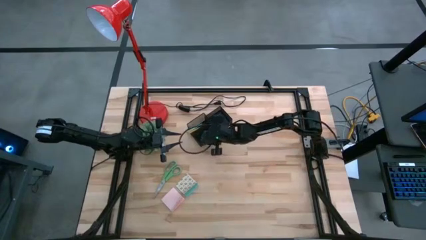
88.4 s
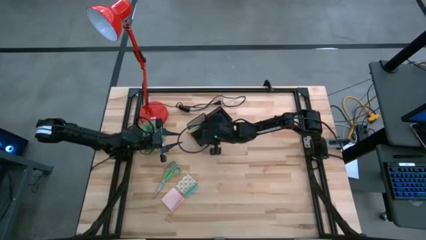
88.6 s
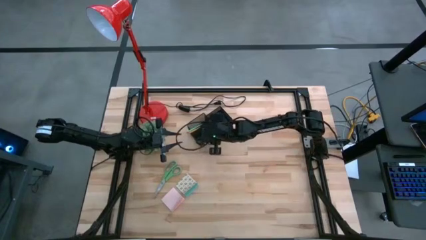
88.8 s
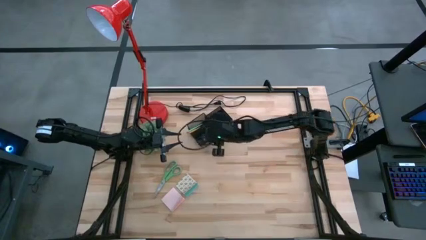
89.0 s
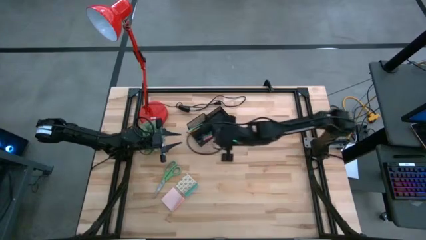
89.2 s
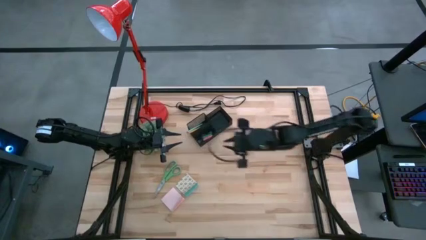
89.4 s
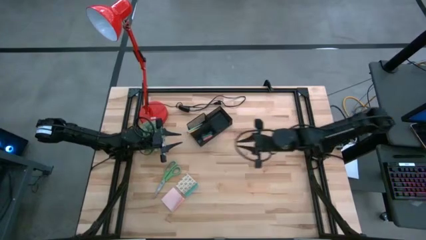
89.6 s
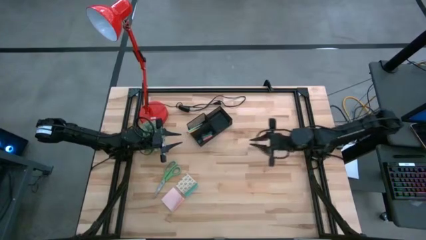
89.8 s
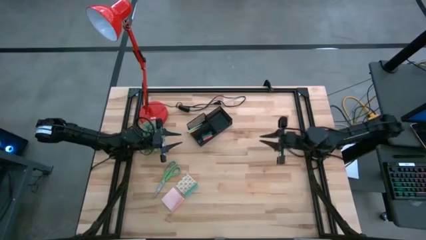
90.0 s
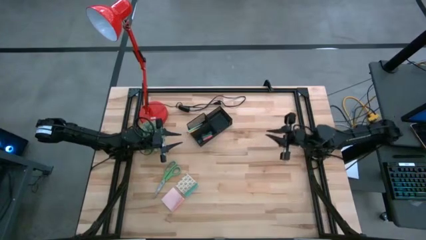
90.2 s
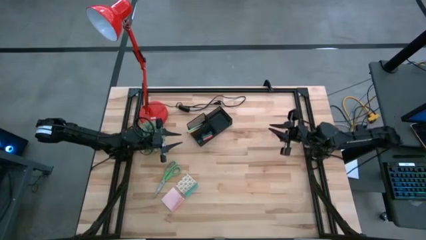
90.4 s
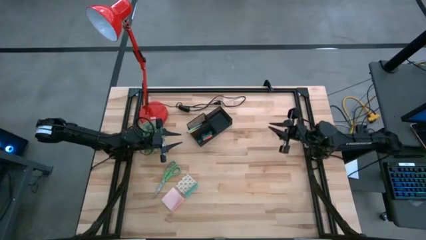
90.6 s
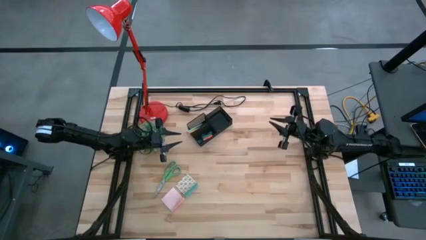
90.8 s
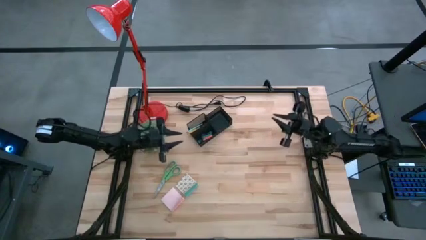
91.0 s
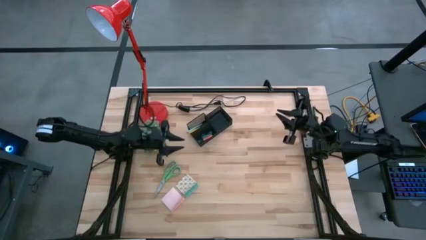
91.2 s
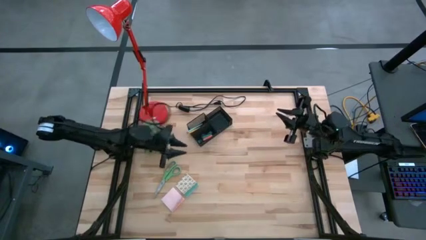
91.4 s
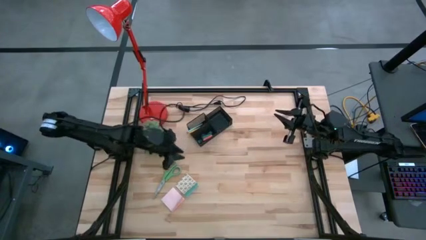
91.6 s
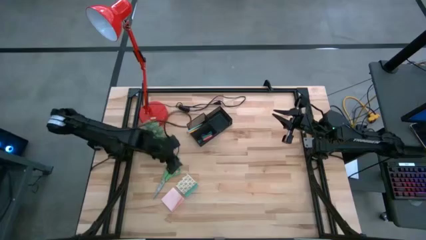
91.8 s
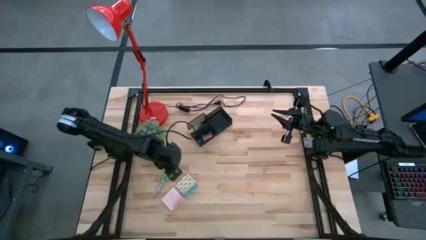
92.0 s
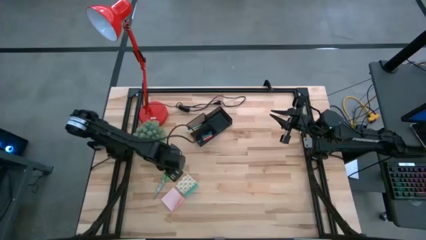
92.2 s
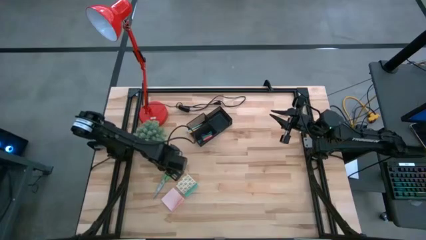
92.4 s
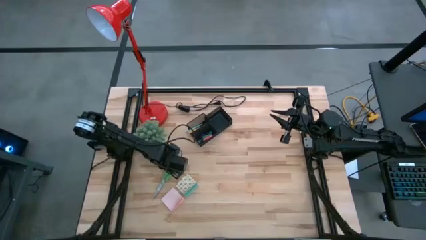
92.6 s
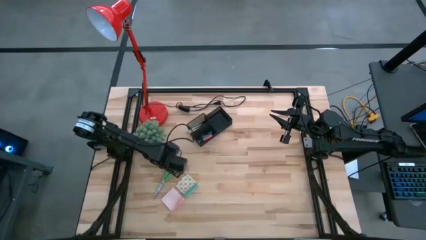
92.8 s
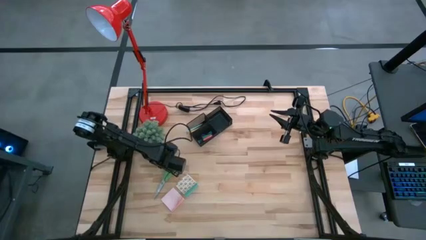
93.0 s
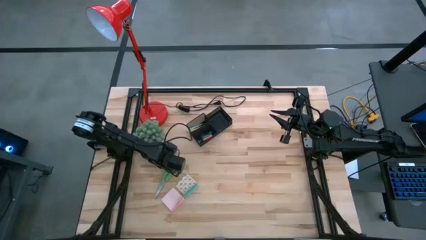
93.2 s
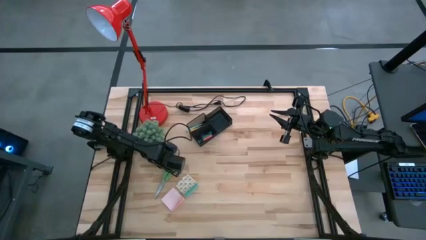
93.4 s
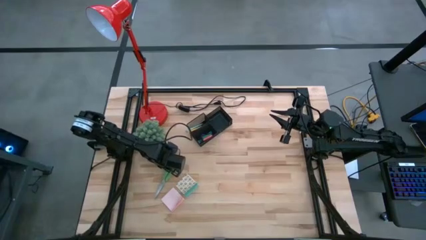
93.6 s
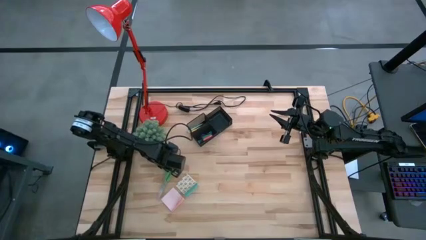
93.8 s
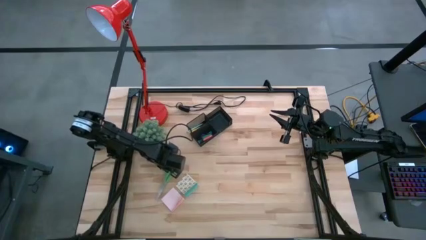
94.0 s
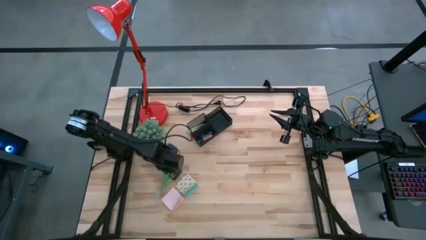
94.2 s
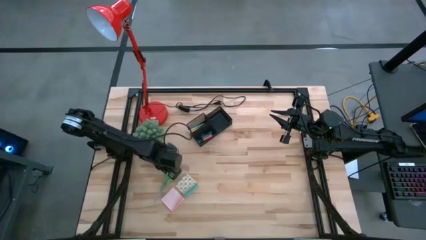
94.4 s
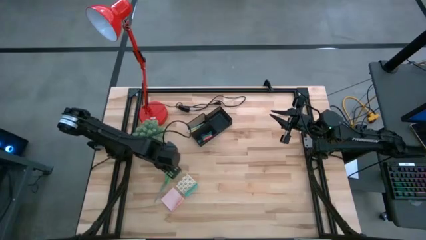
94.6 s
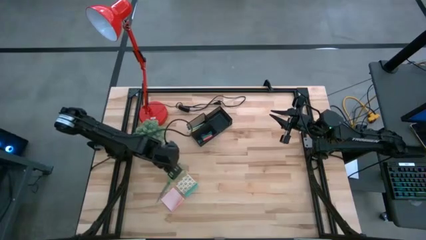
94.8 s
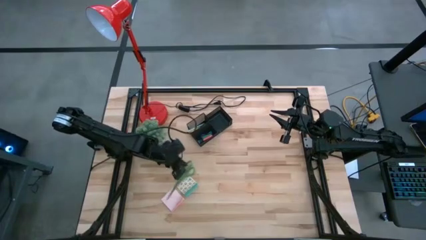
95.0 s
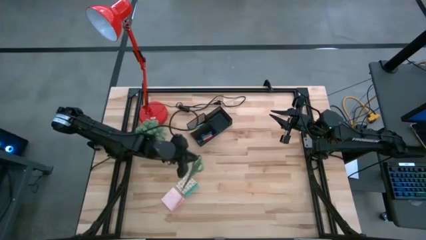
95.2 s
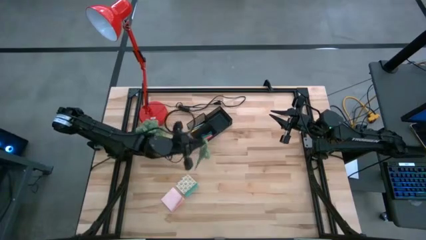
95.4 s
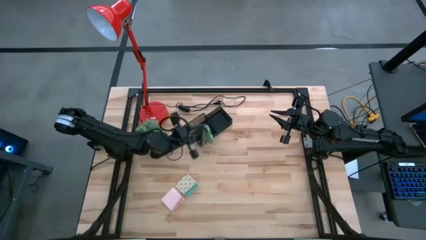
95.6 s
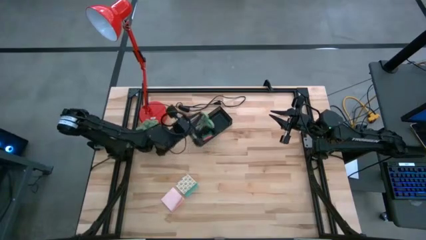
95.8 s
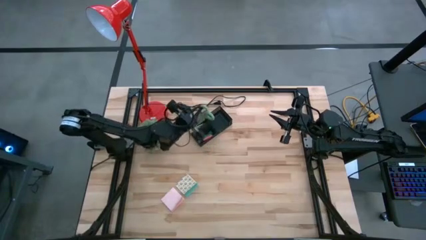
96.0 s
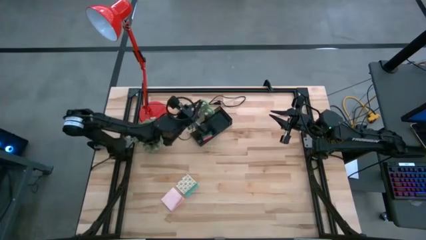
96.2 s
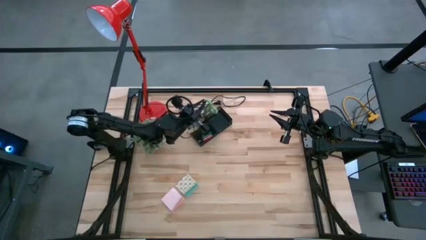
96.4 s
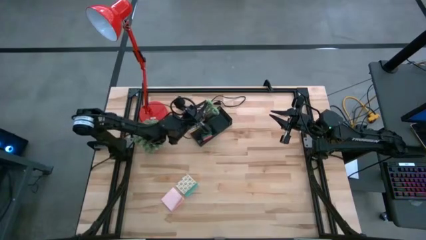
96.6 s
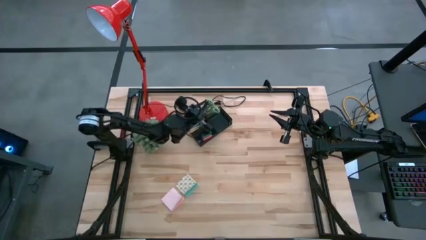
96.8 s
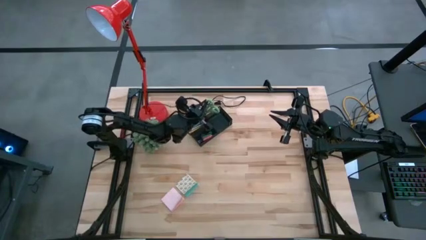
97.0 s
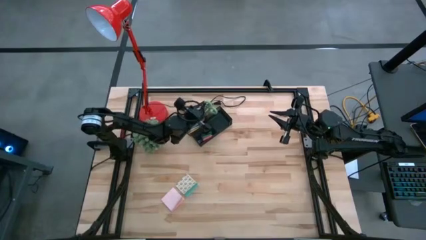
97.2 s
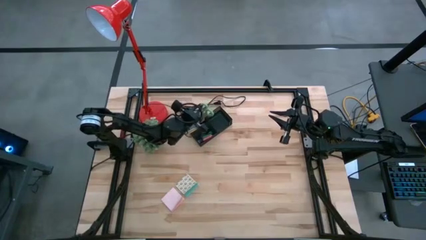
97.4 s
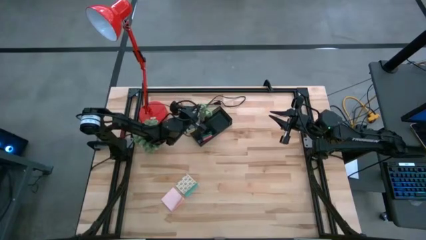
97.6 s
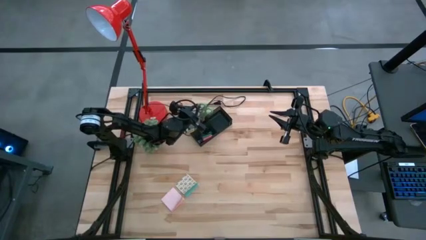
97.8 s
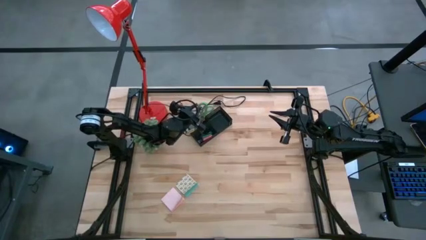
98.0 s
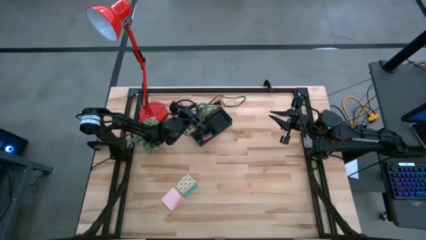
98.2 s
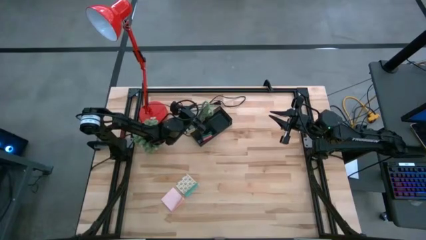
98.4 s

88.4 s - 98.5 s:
Task: Pick and place office supplies into organizer
Put the green scissors into the black desk organizer
